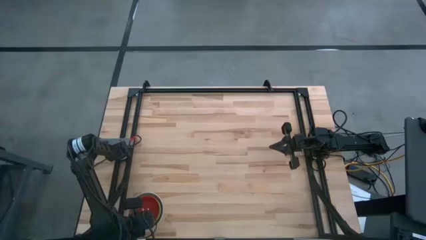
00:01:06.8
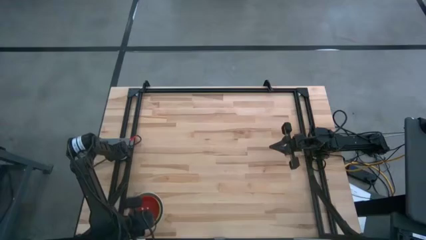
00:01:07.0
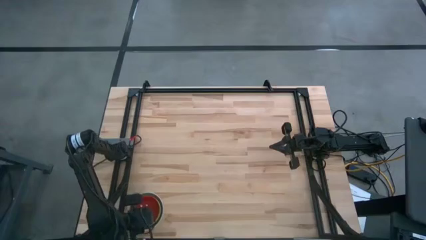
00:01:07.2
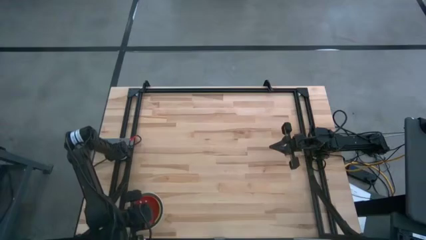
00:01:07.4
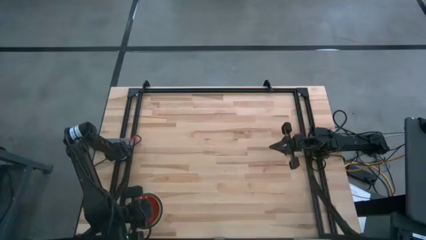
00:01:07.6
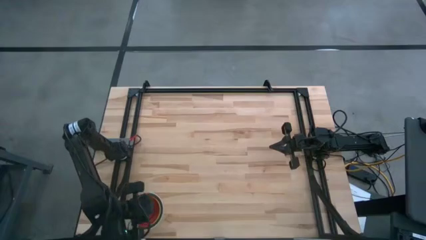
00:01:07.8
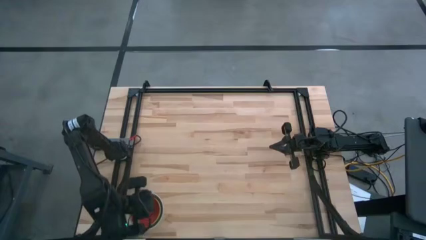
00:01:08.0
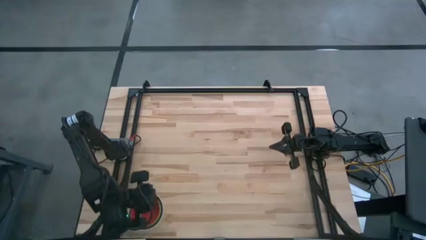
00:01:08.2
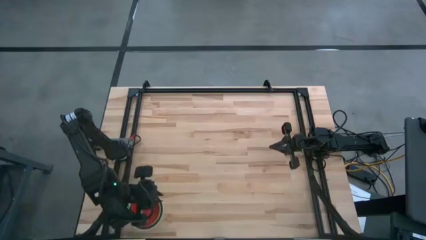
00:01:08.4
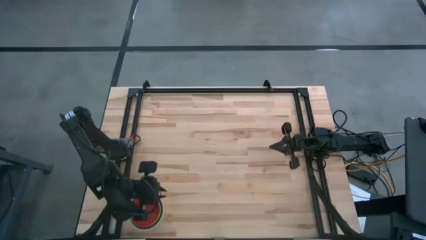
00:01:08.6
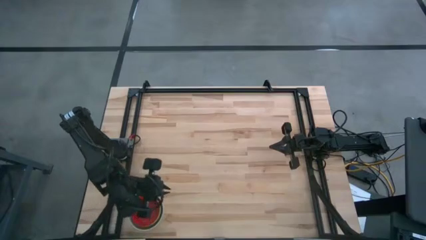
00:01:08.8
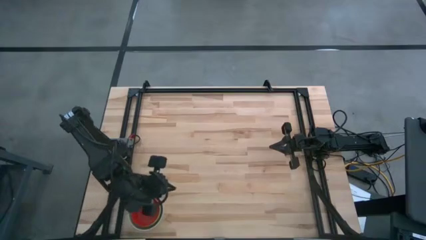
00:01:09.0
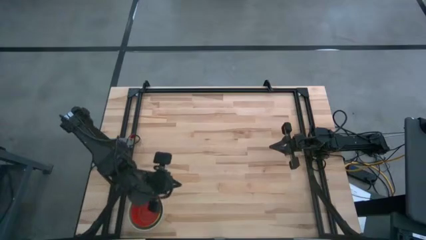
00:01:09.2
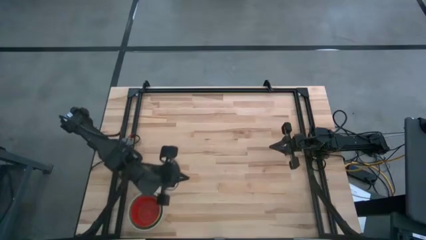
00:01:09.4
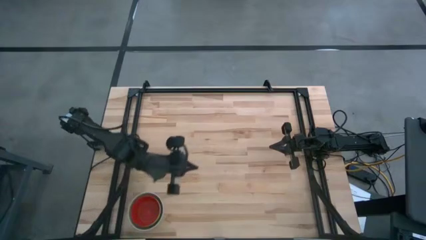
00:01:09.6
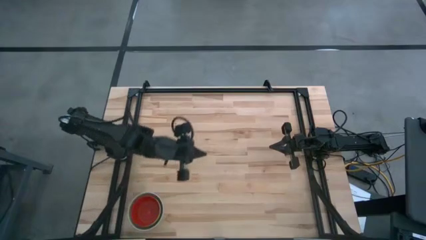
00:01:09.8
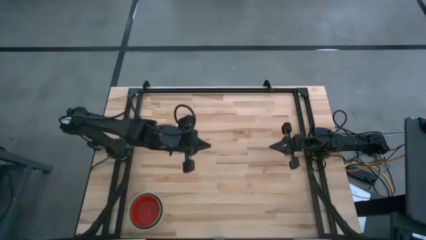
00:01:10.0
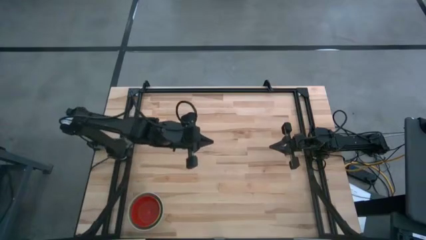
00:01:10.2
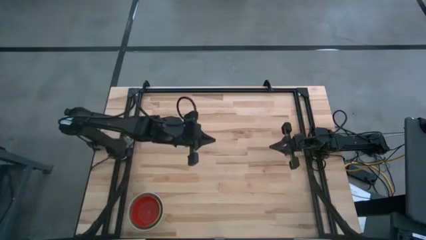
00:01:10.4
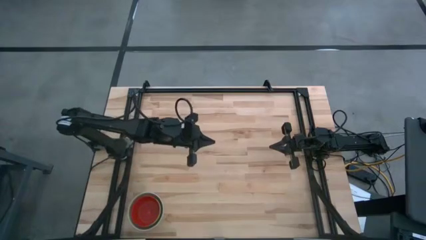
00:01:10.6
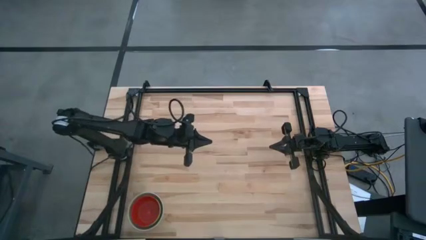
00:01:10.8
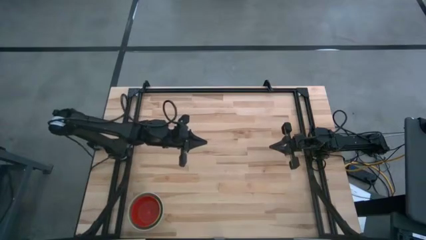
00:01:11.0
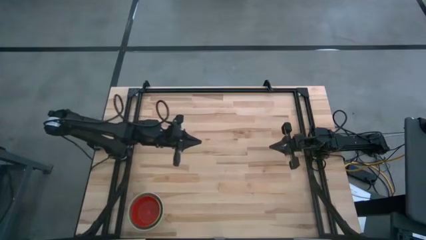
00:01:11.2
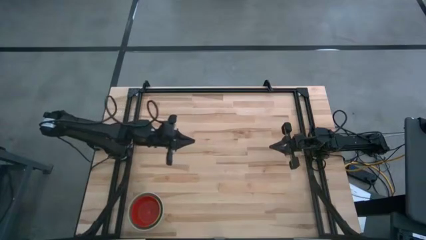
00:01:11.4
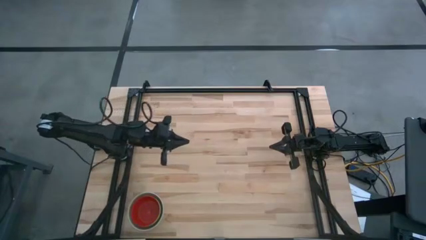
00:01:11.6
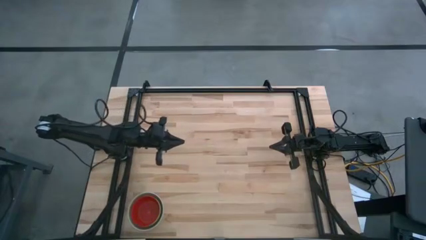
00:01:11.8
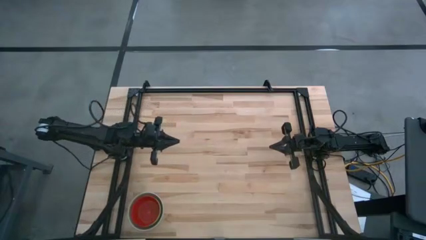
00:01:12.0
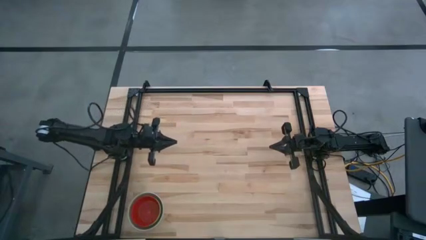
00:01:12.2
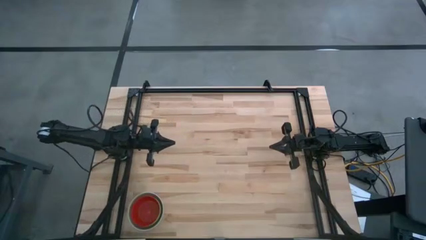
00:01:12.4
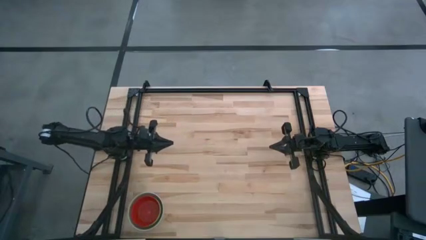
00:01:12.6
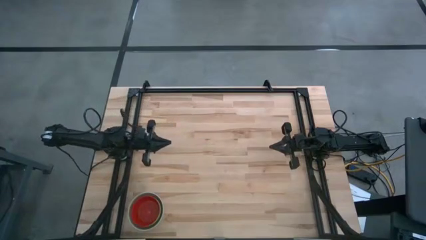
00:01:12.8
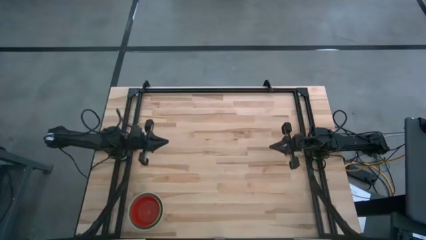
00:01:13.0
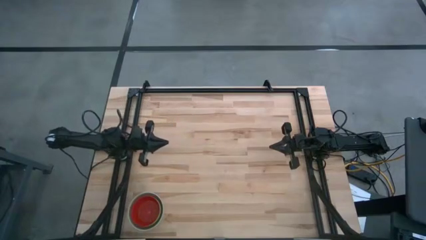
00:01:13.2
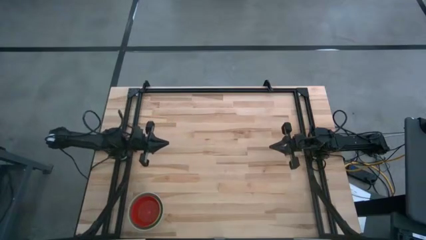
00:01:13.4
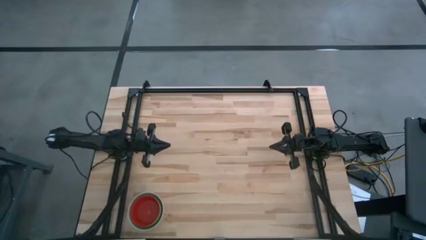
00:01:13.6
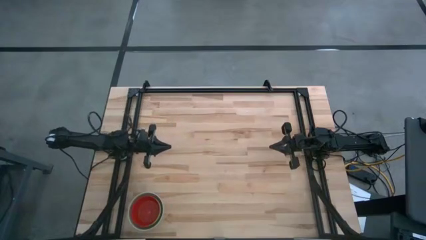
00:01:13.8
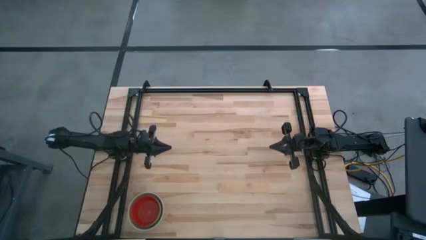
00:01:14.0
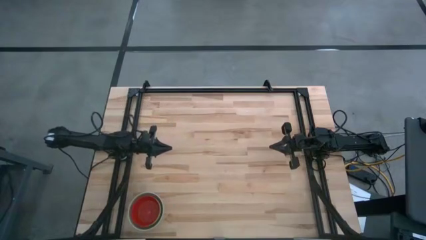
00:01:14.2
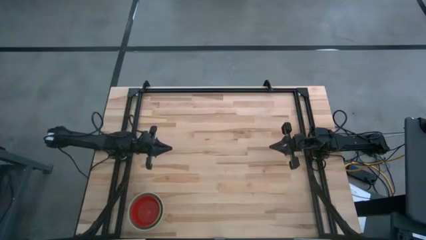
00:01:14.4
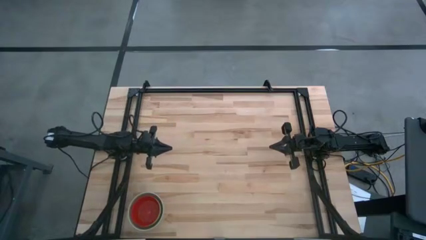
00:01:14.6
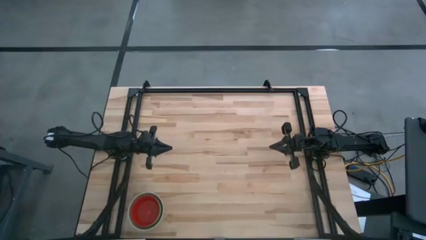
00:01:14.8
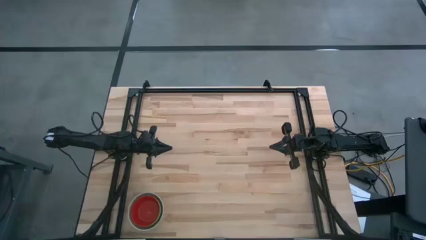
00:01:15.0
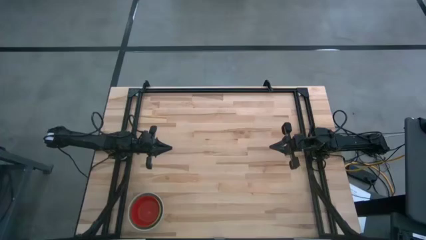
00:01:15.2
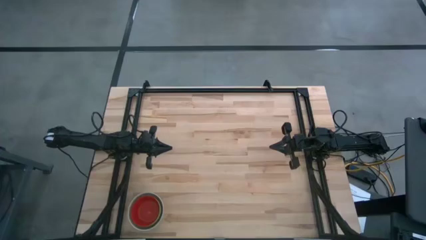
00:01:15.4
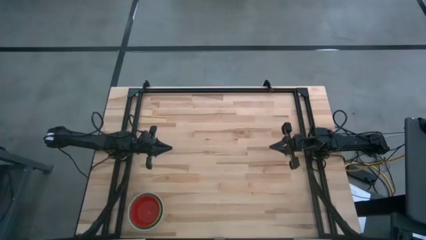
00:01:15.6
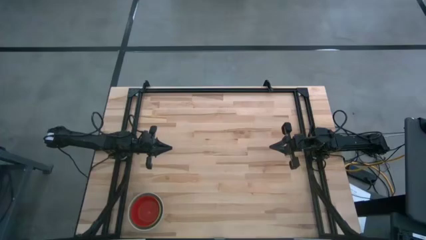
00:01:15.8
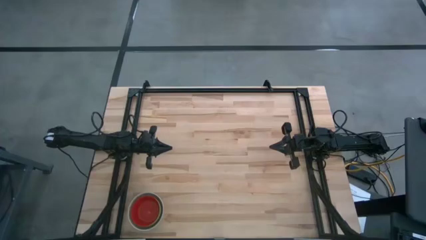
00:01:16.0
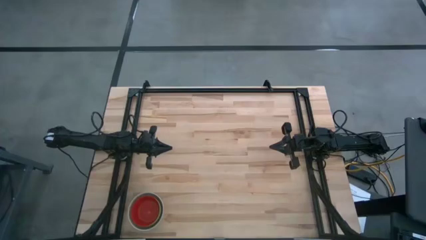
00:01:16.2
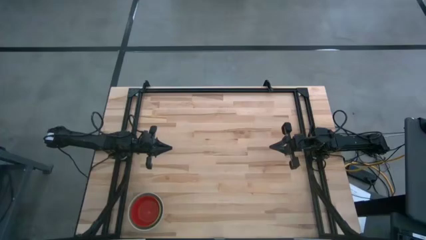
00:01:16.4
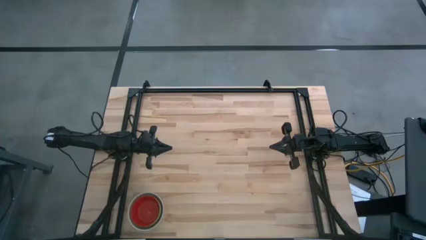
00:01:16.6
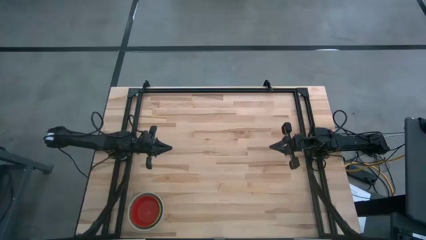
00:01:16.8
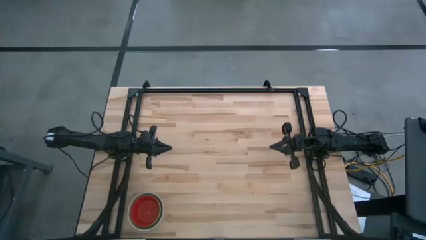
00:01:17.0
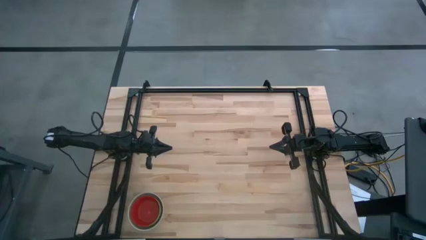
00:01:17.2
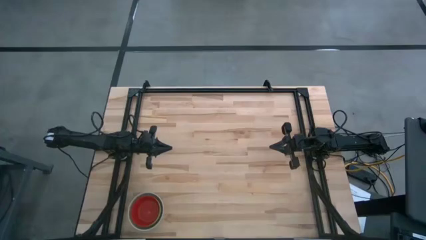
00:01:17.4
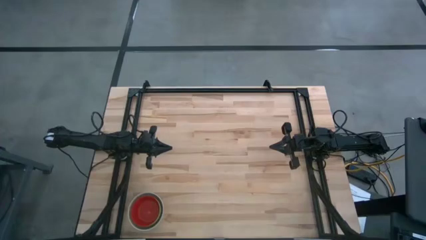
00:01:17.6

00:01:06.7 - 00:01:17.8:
Return to Home Position

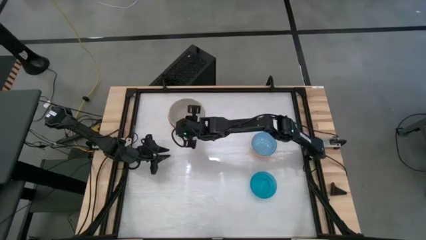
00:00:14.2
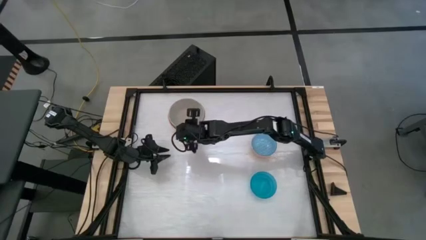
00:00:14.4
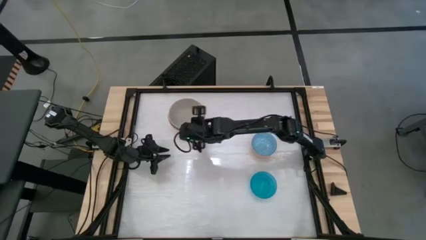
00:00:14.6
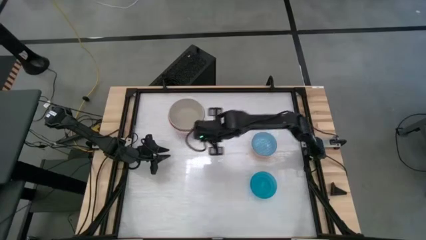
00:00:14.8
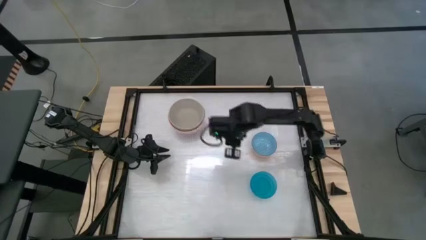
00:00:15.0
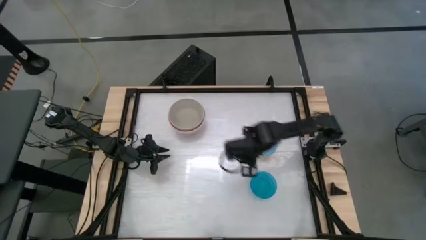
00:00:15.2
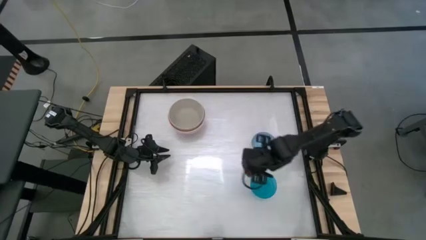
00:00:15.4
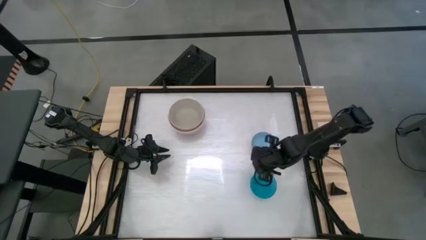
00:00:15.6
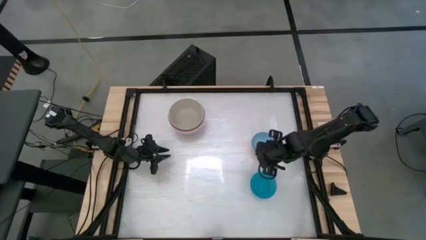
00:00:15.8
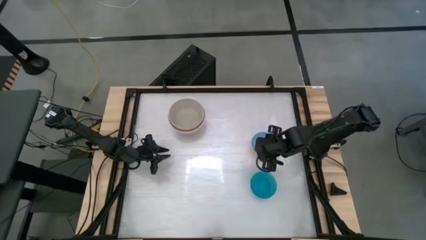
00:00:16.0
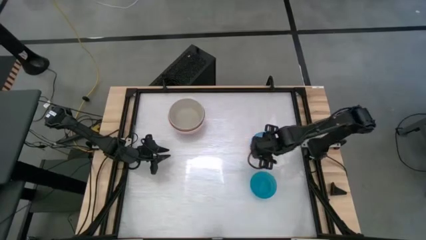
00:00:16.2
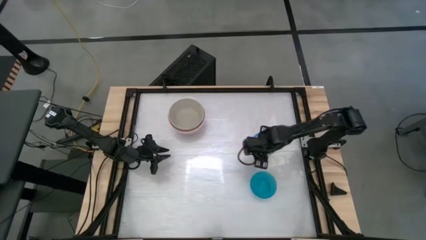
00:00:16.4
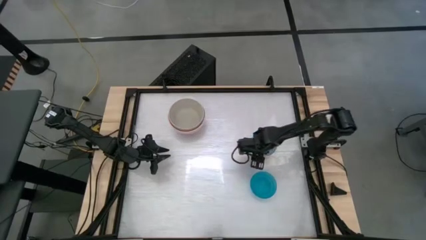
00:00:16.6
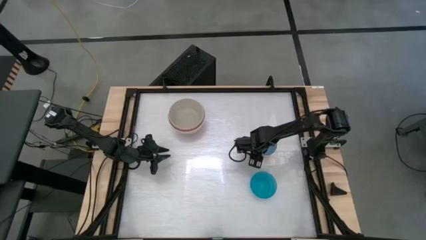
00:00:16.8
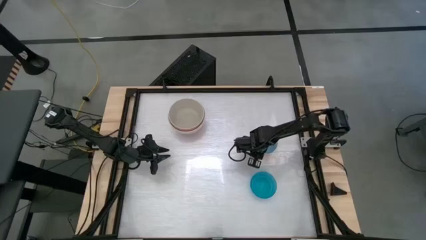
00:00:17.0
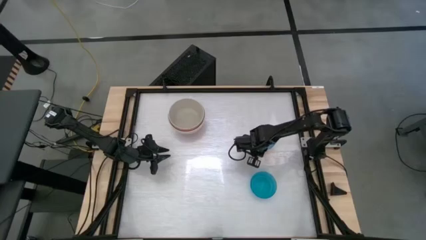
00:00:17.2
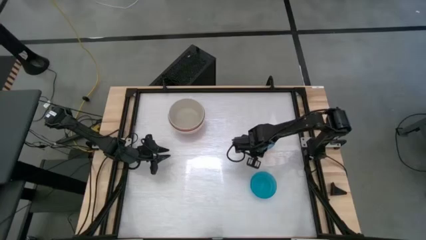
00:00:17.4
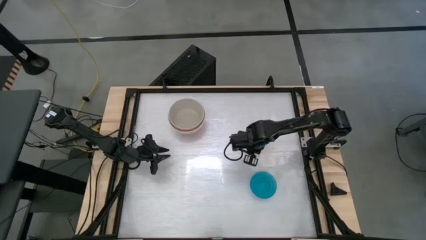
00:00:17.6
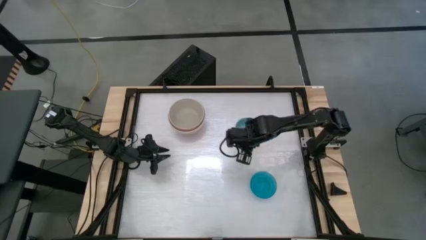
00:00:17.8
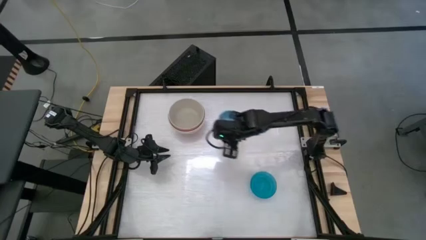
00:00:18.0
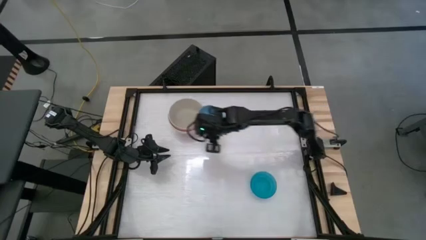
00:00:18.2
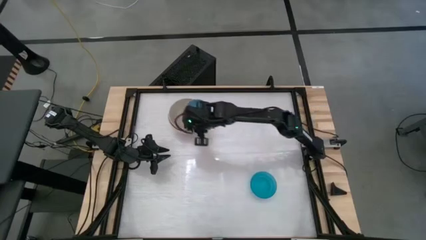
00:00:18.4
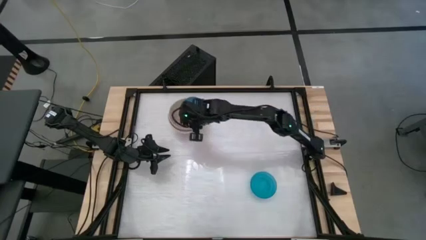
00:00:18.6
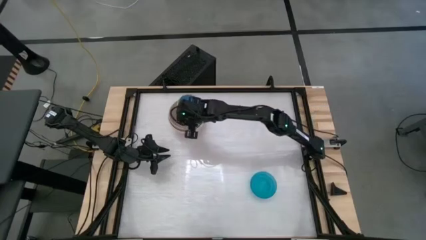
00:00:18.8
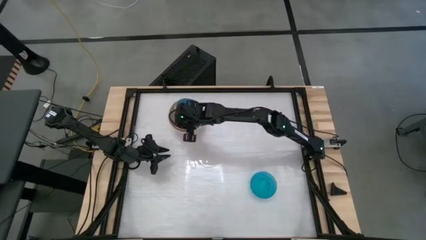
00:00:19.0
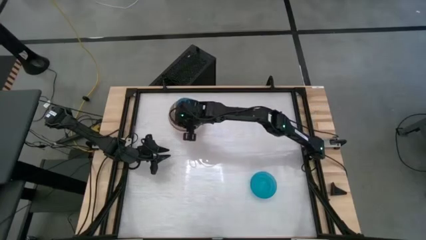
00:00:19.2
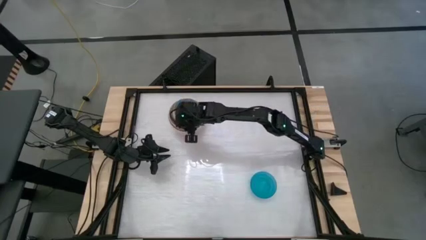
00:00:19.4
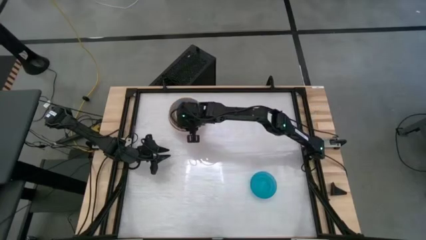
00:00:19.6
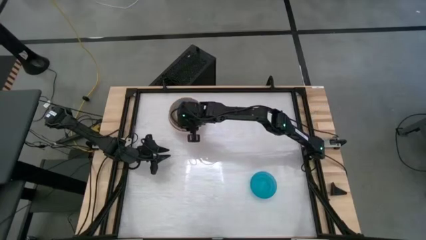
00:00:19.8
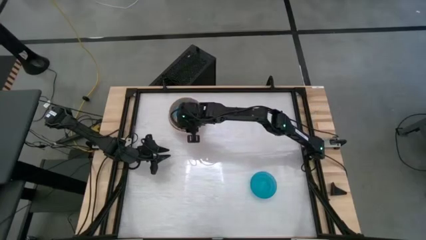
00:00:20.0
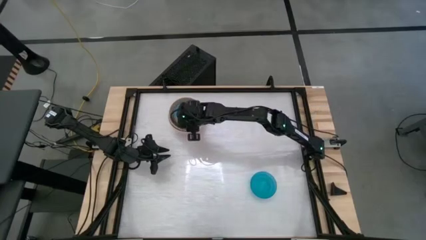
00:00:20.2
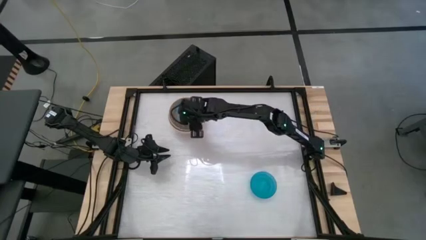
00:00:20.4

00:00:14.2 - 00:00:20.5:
Stack the orange bowl on top of the gray bowl
